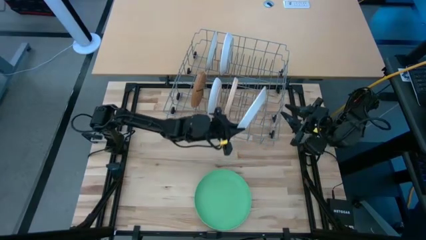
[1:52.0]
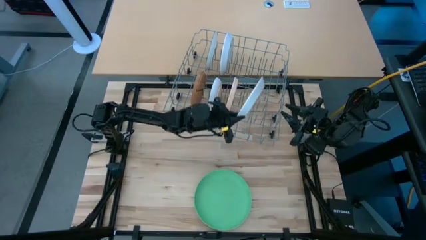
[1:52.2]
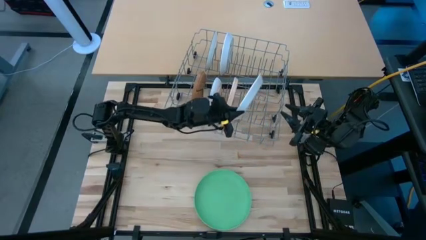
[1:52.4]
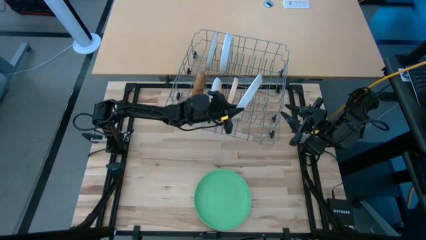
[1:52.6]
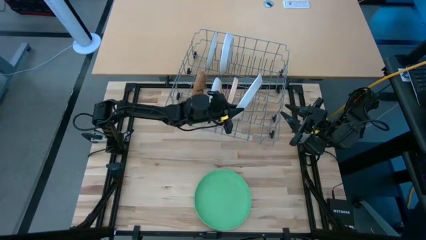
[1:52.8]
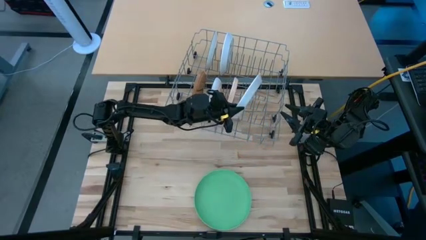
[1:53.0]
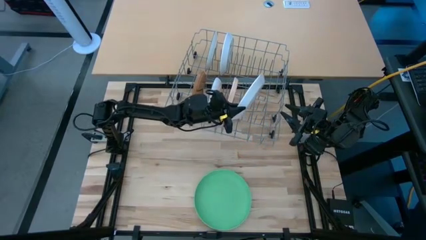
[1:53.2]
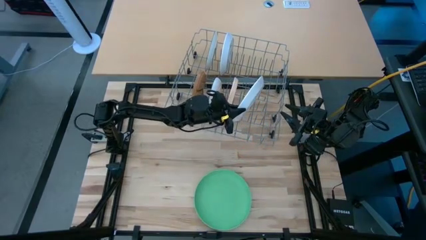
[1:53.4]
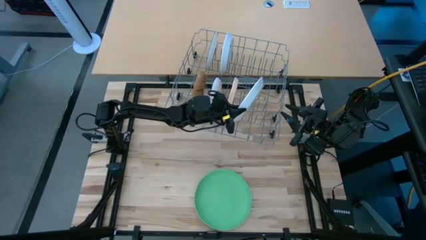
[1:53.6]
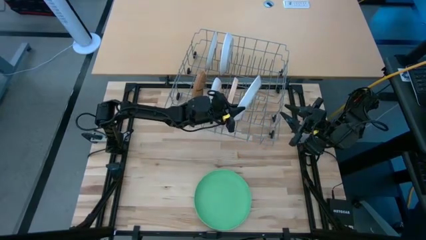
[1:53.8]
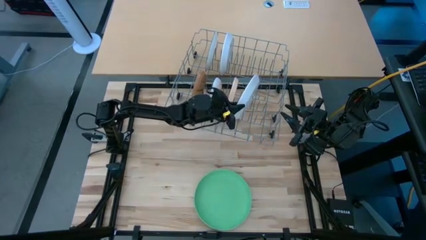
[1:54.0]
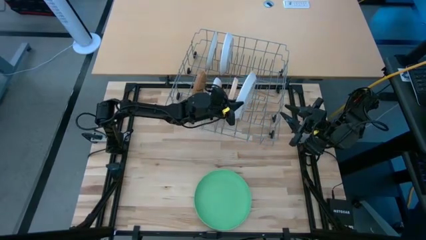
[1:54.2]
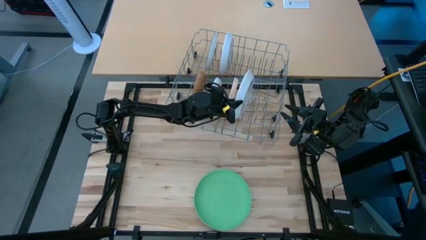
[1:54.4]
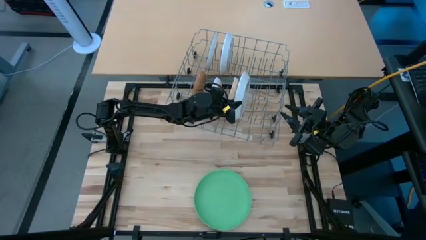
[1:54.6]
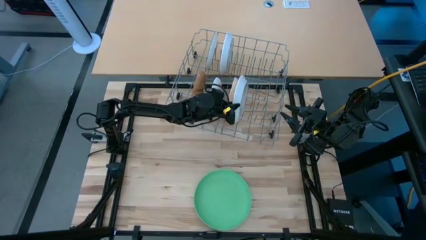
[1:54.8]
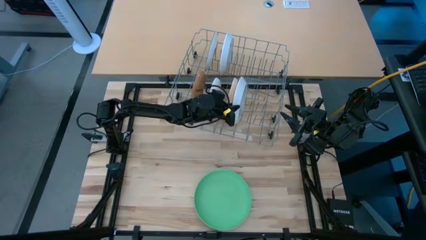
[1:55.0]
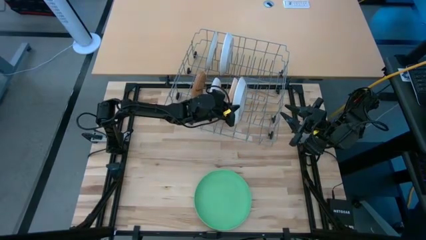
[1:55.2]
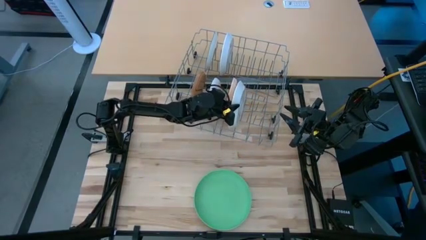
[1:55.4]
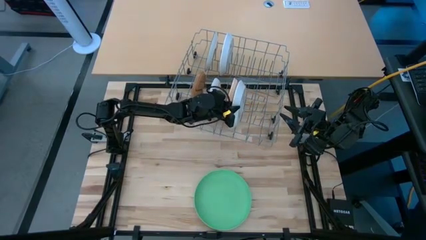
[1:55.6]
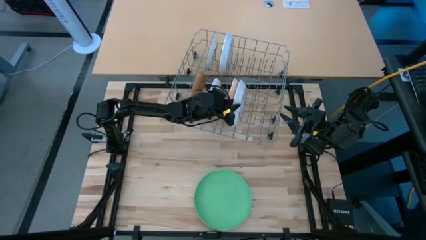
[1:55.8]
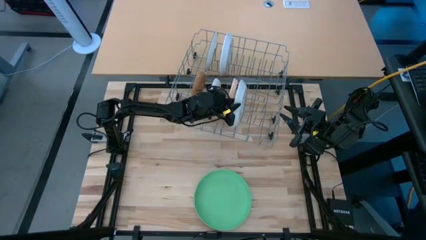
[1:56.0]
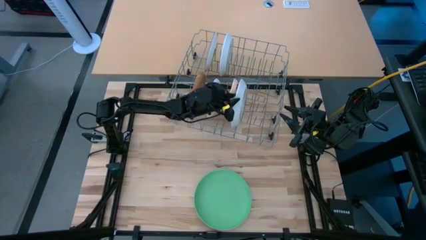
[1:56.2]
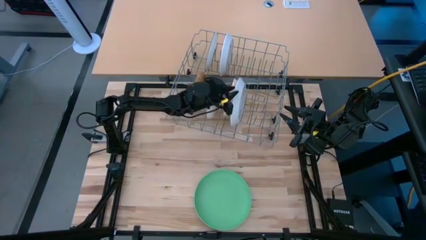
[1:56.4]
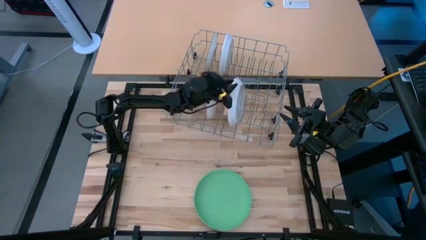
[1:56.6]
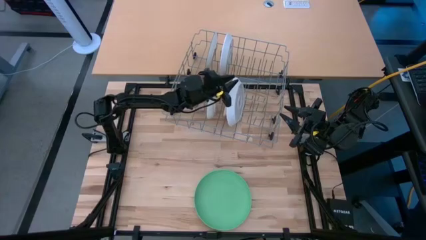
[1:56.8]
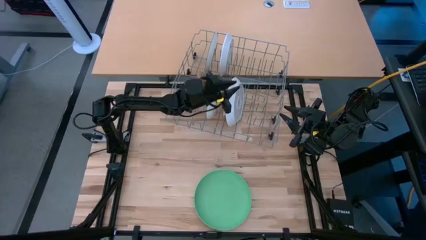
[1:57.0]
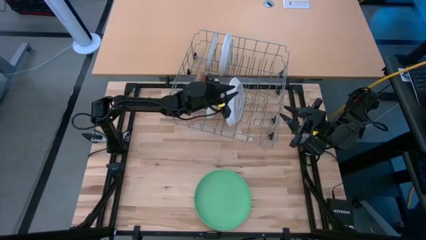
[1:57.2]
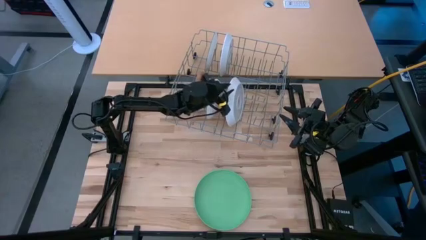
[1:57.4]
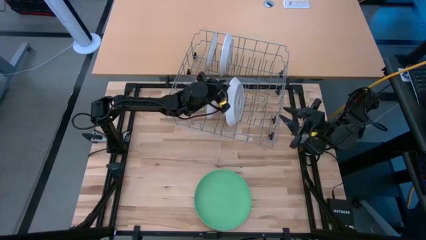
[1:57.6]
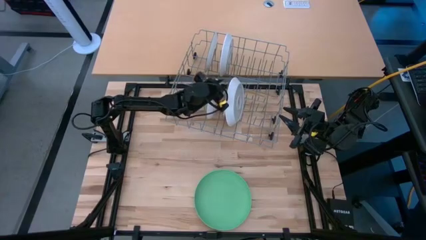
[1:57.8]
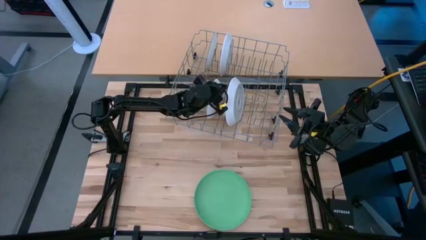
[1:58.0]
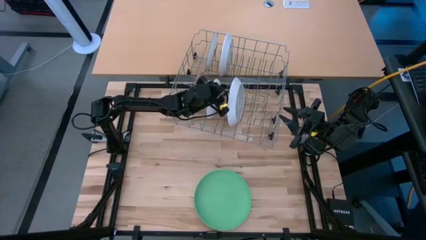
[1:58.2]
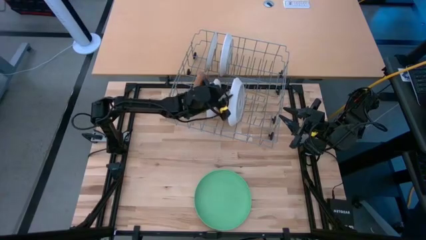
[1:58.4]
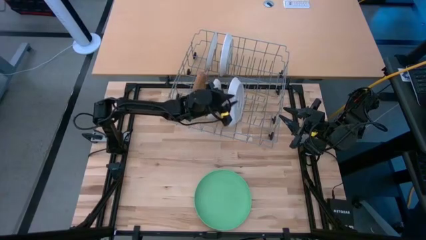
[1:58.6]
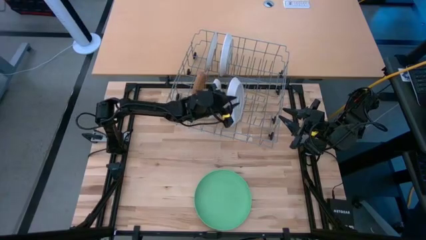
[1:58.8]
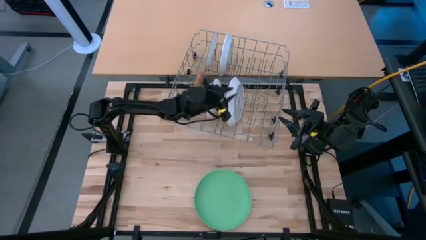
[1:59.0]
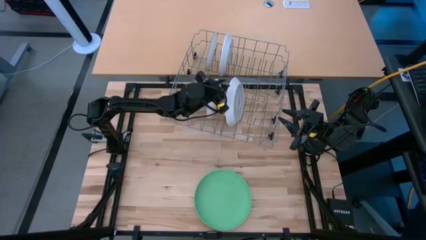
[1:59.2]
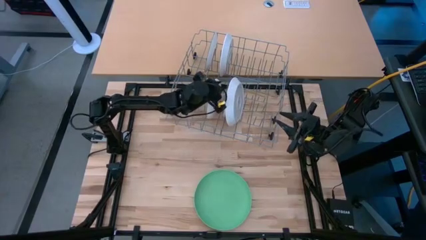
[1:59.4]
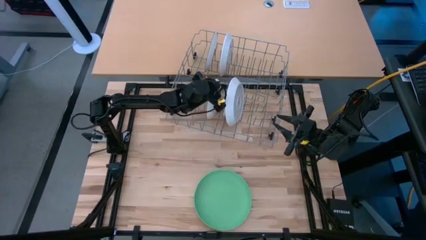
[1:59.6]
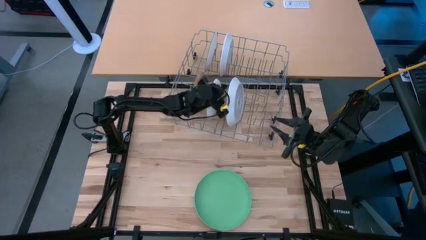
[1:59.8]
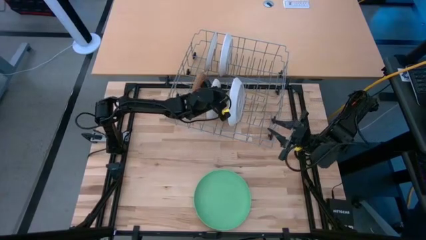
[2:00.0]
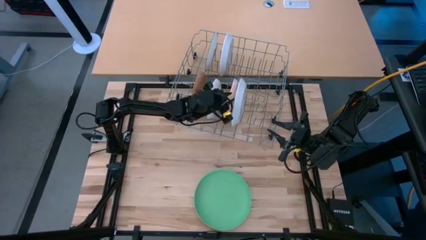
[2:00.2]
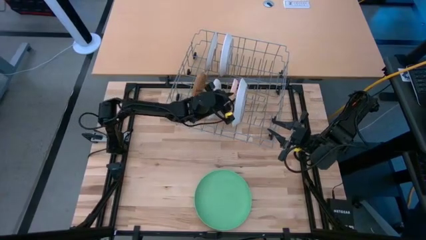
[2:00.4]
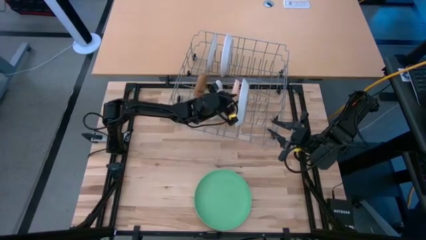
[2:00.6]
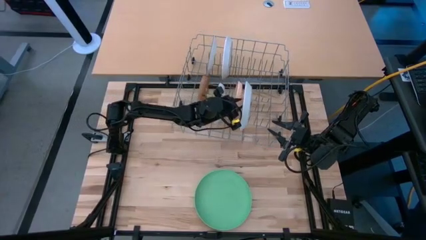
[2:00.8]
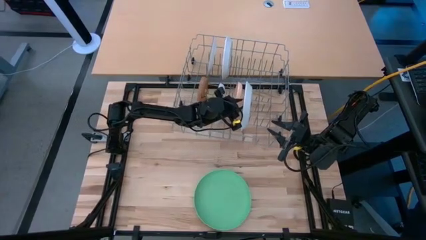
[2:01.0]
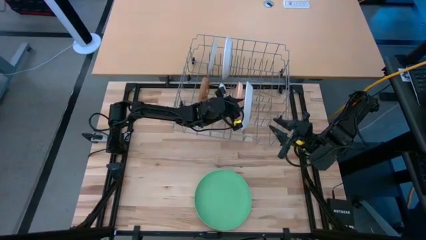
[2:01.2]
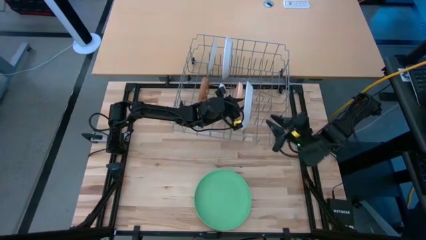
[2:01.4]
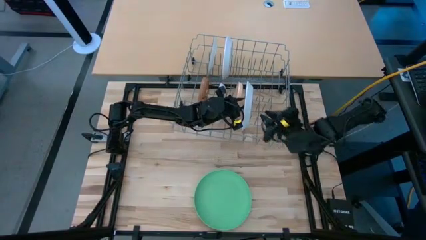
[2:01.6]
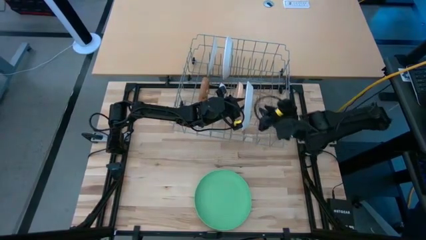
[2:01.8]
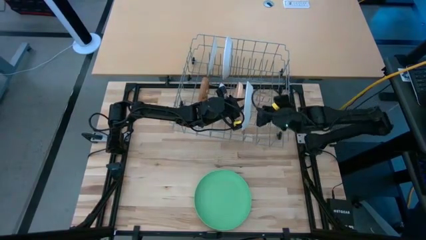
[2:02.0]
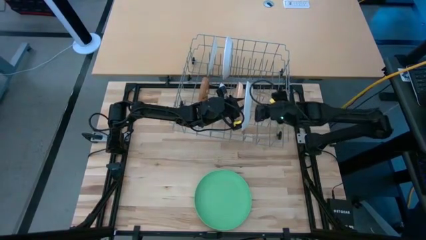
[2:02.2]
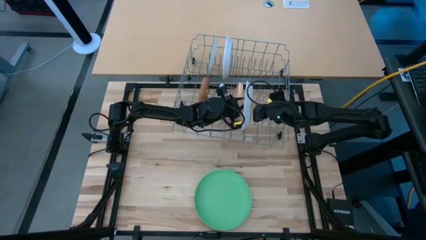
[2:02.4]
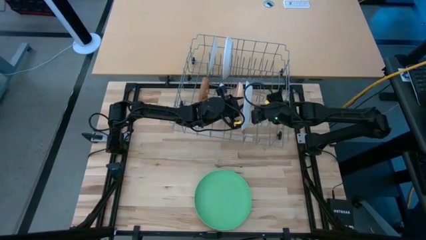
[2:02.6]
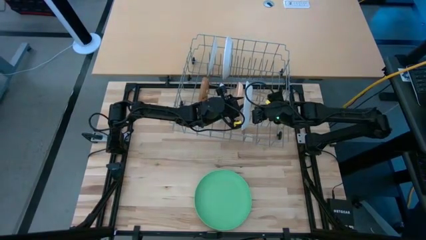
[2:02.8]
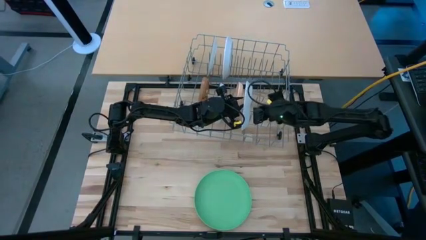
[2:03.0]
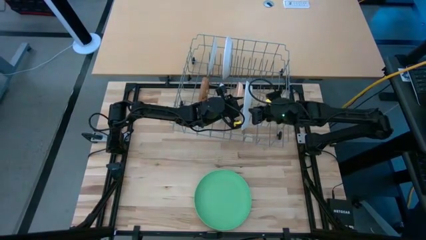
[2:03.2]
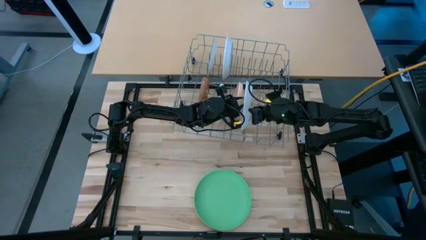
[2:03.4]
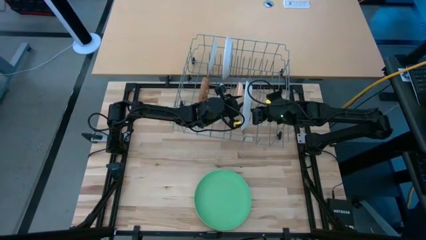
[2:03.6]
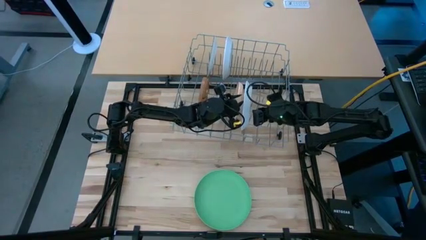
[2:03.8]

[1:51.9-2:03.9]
Task: Sort dishes
Put the white plate into the gray dishwasher rack

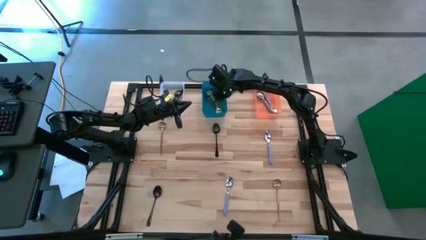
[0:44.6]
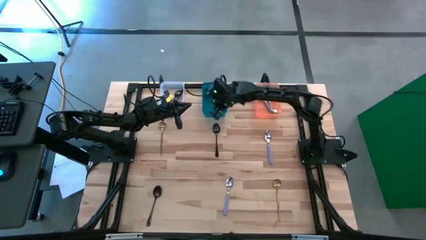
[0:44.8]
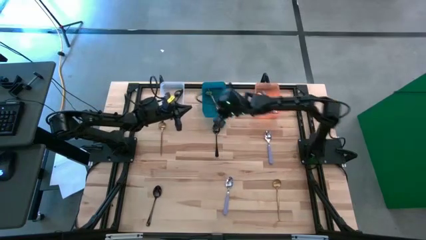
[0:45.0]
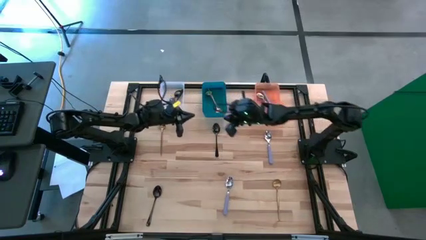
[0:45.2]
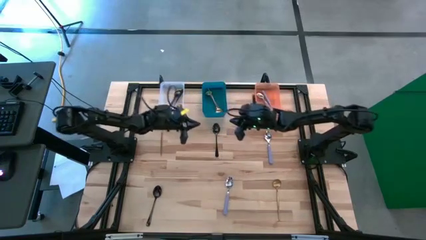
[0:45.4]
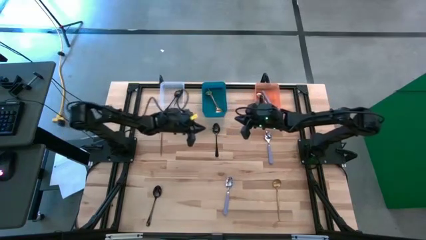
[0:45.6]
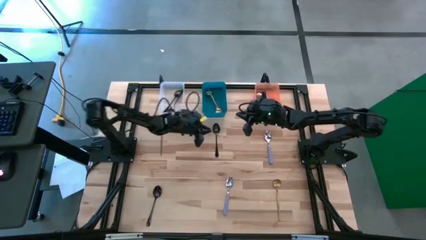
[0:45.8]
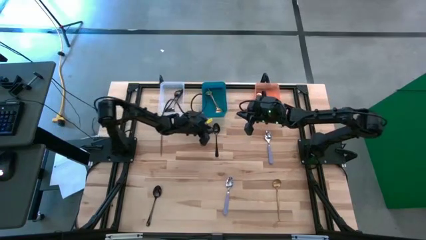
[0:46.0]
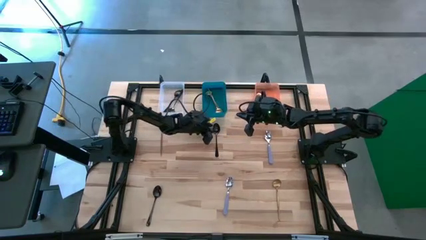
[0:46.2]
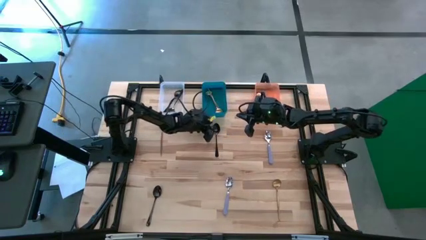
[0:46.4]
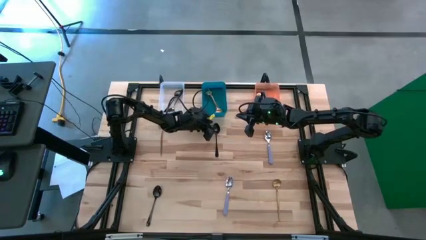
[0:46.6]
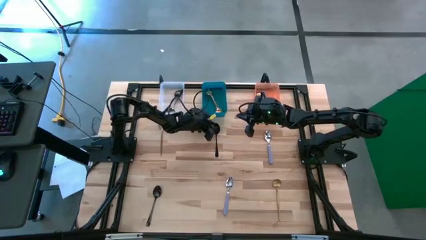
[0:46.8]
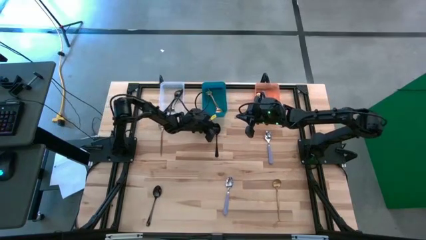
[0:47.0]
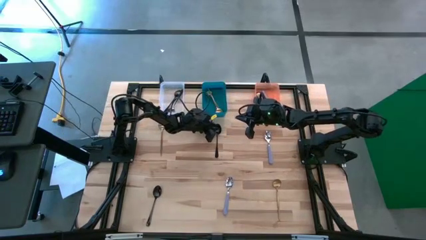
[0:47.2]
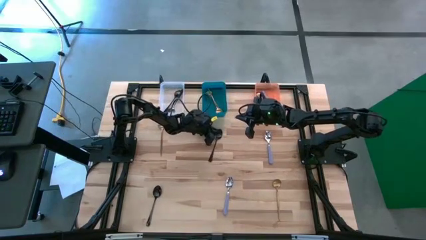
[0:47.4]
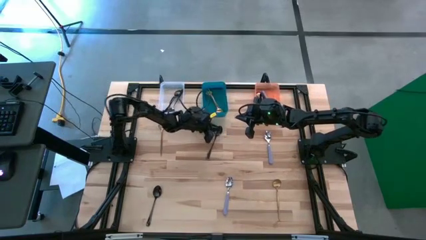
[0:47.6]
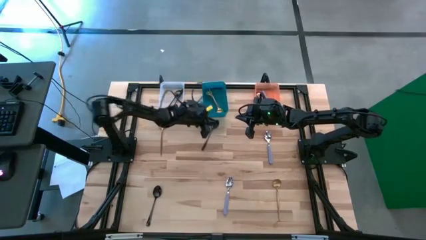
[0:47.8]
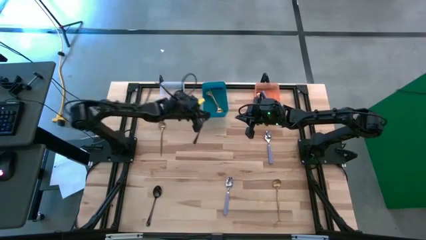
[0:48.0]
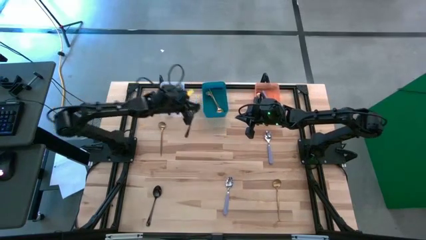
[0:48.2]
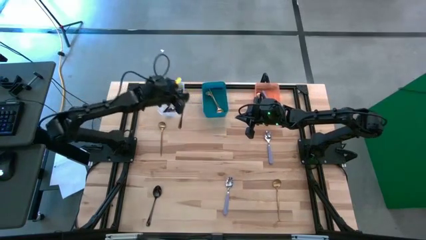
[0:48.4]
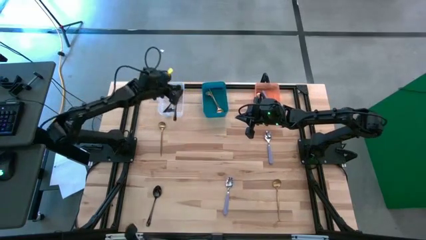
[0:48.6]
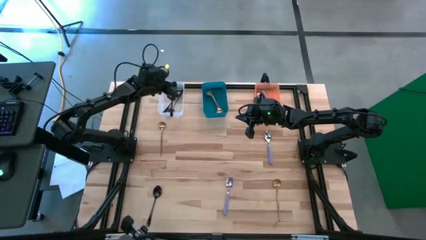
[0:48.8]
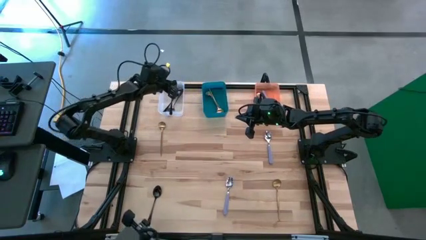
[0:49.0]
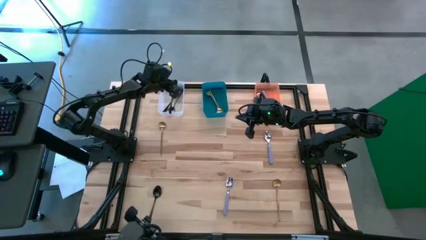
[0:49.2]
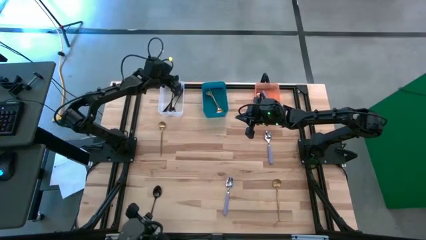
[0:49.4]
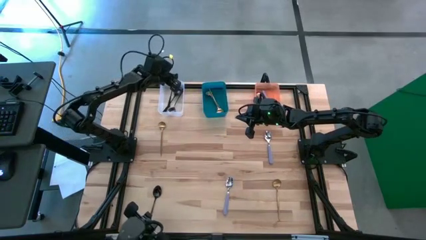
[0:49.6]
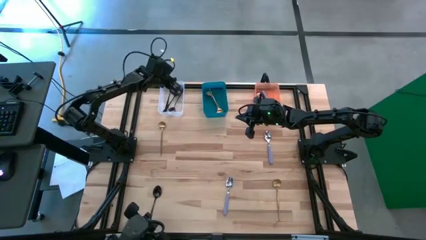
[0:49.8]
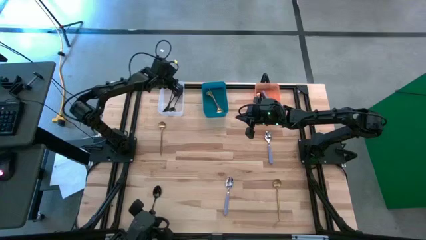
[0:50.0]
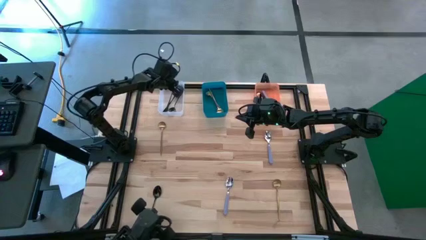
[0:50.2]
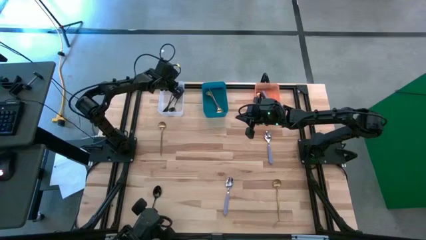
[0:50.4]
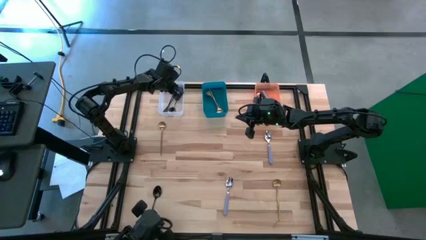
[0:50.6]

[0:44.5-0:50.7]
Task: Sort silverware by color (type)
Put the top black spoon into the transparent bin
